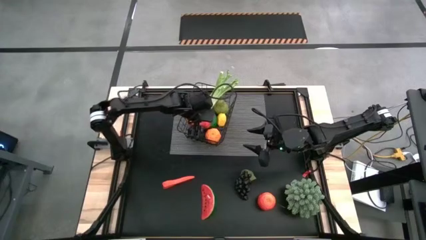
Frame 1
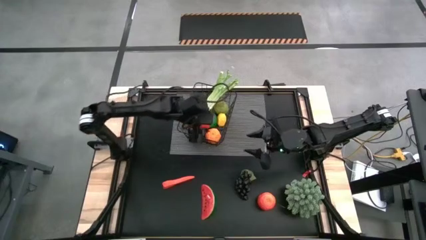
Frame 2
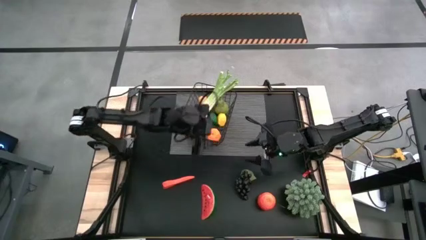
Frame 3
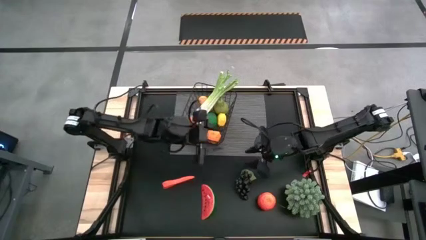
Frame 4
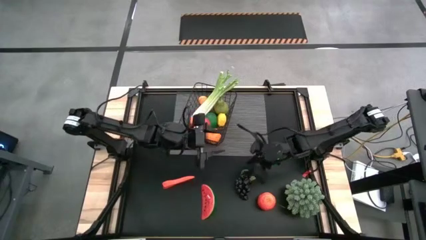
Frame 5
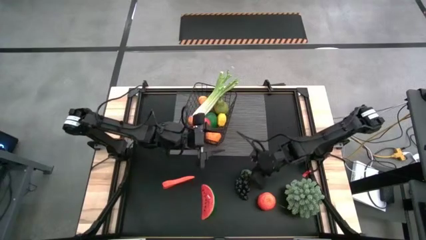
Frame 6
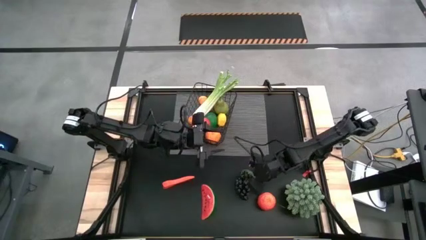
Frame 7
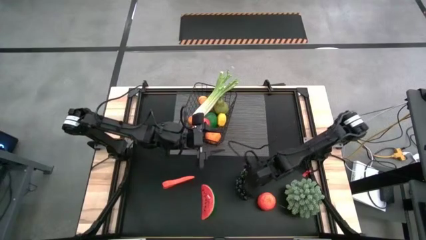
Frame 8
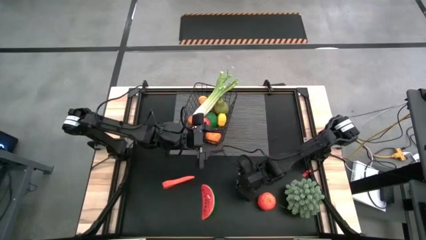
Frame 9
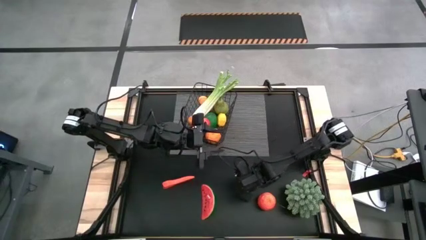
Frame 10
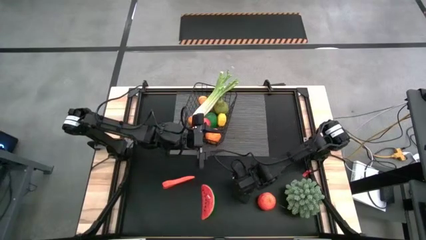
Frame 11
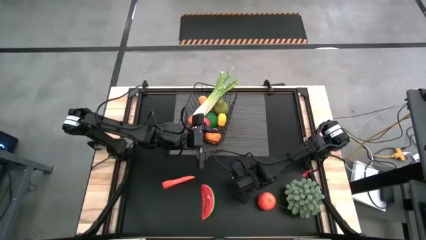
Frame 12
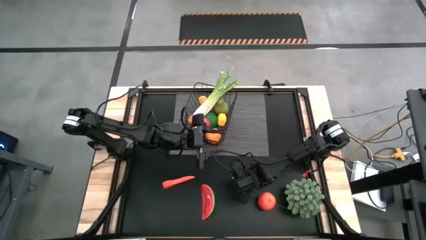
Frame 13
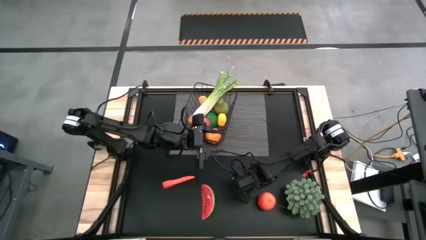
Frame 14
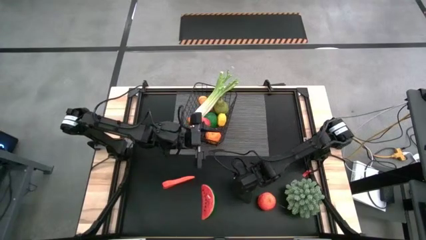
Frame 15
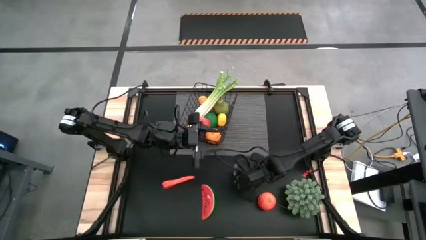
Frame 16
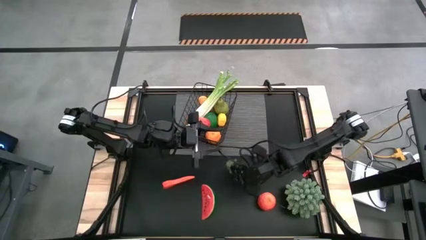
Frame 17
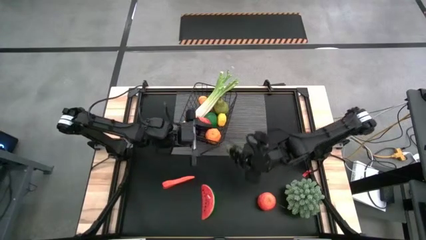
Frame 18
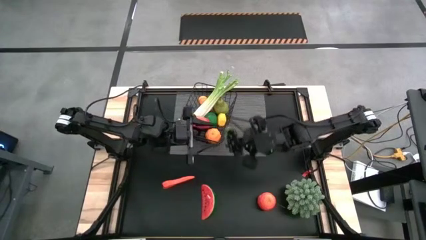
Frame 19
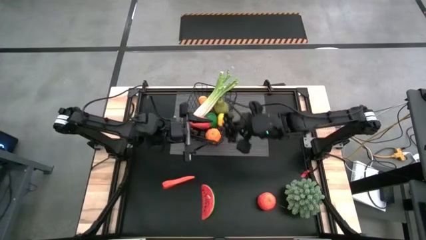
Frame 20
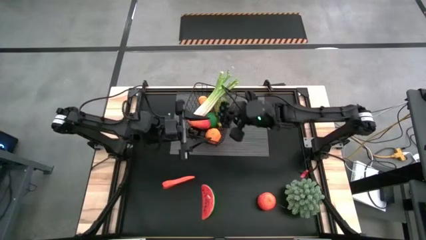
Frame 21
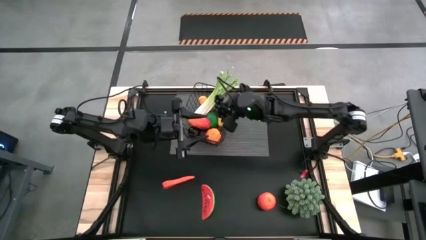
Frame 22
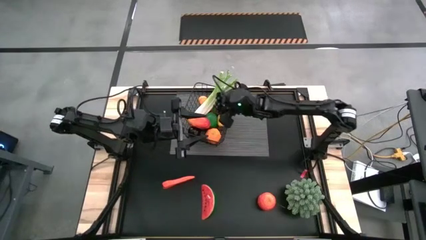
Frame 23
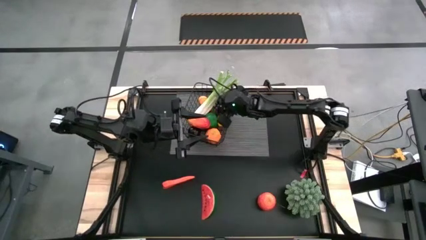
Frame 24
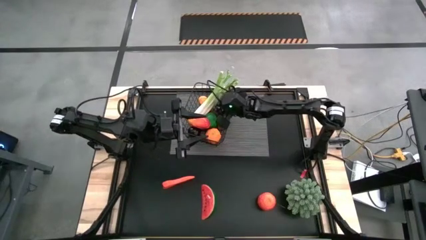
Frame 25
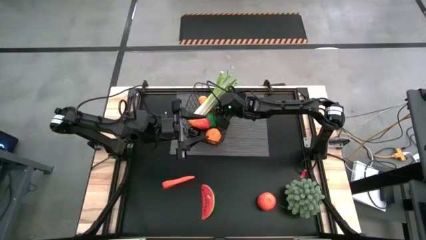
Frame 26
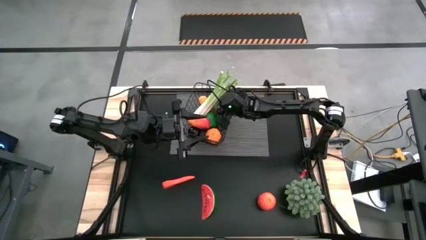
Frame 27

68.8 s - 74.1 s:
Task: Build produce basket
Put the grapes into the wire basket

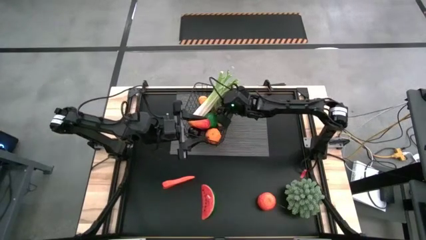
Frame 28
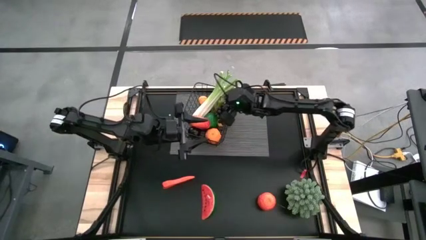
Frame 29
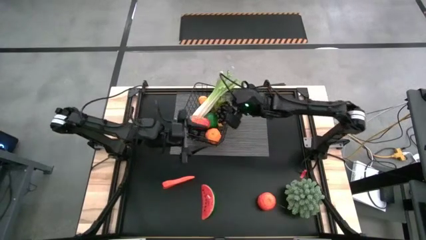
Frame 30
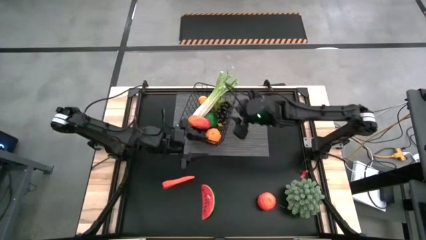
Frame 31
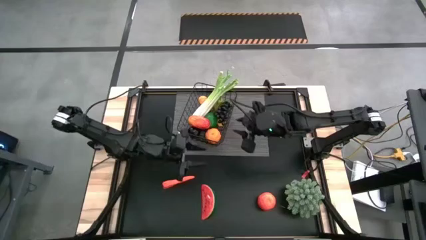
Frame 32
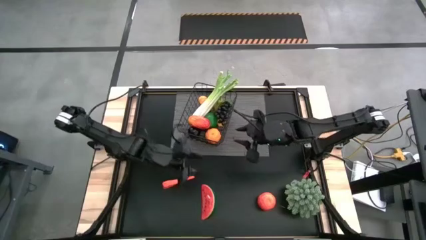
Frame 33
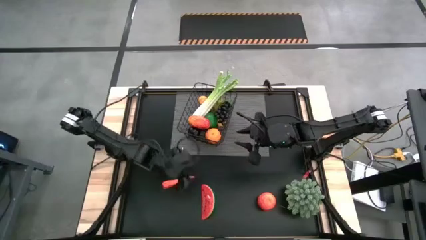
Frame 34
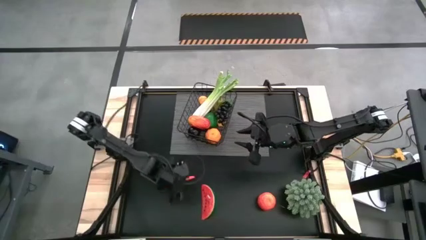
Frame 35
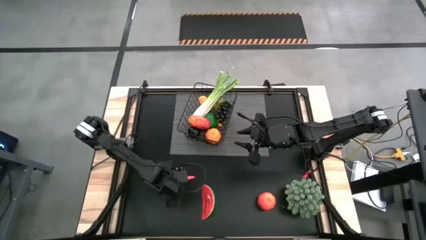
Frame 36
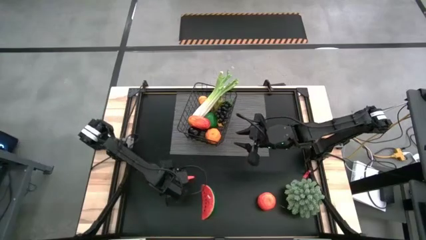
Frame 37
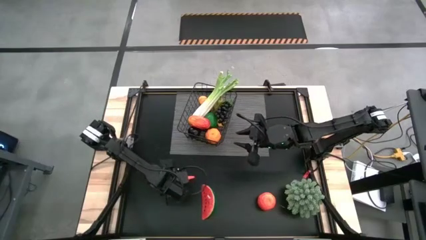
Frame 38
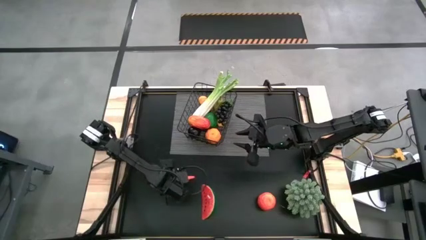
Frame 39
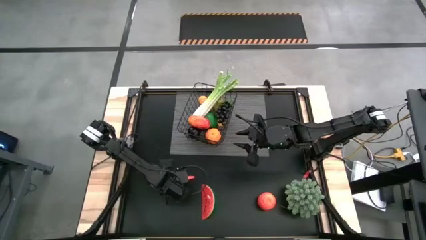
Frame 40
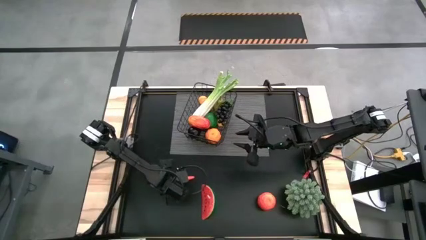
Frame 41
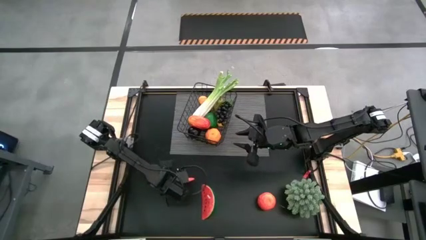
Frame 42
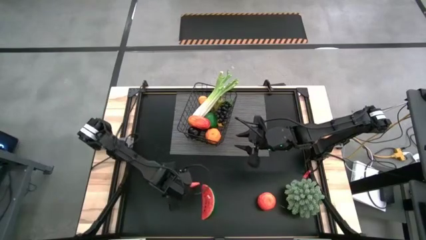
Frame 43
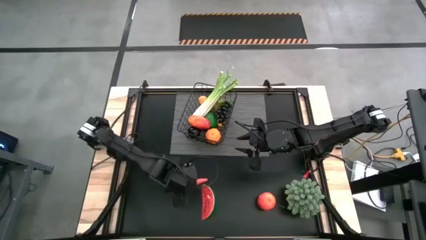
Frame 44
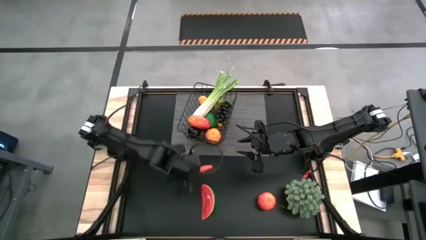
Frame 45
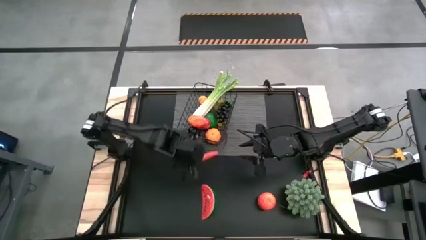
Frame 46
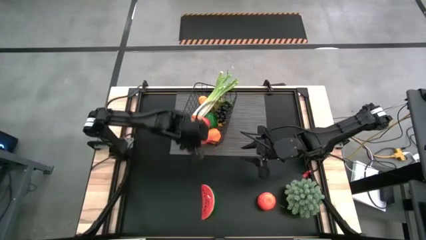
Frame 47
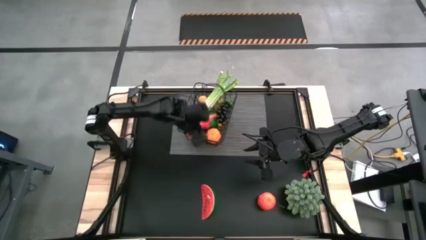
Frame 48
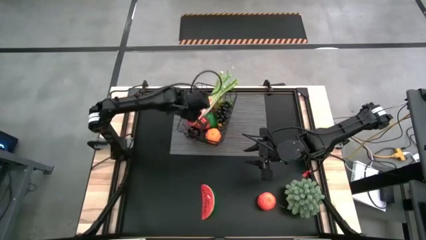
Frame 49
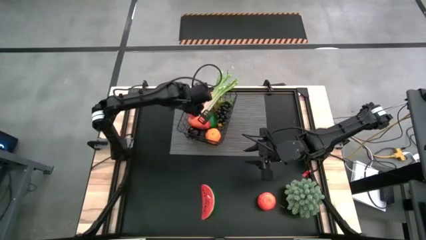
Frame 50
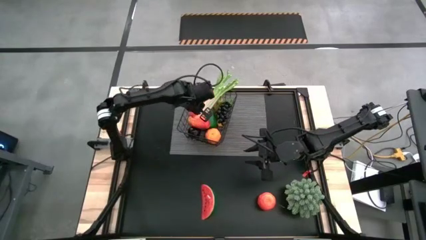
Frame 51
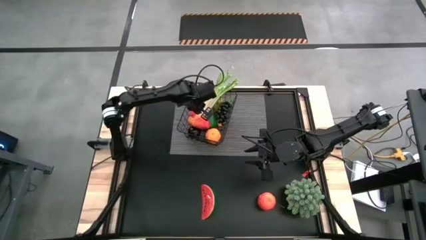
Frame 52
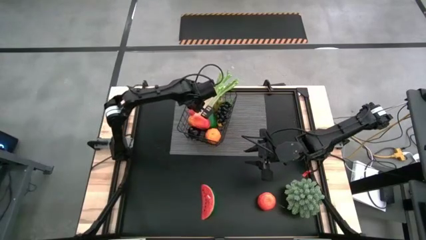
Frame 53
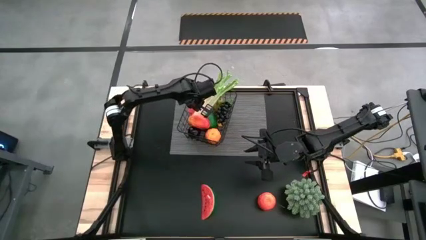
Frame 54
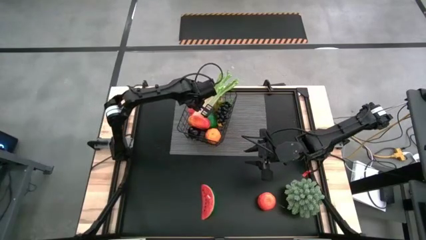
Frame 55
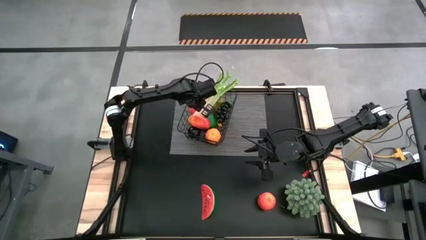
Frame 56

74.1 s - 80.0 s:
Put the carrot into the wire basket

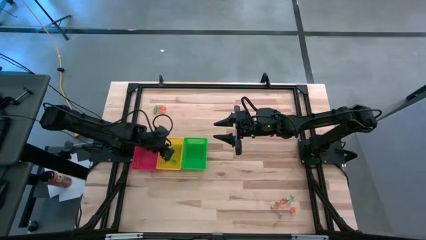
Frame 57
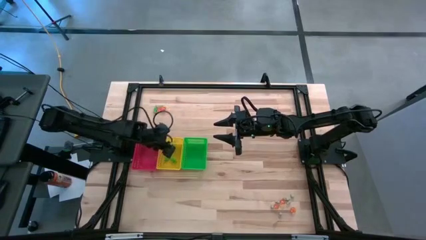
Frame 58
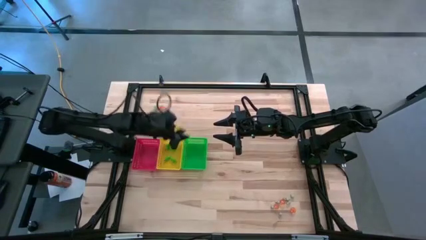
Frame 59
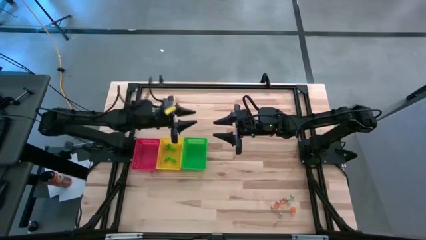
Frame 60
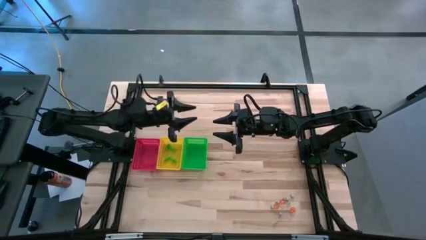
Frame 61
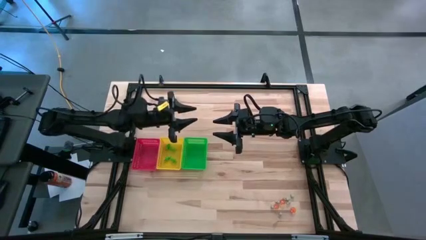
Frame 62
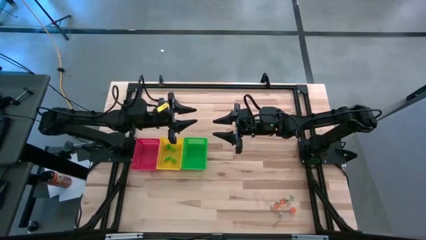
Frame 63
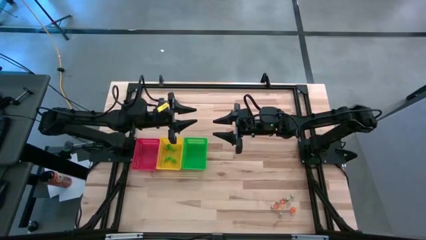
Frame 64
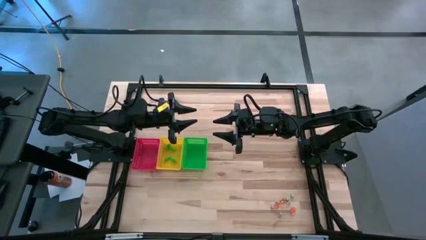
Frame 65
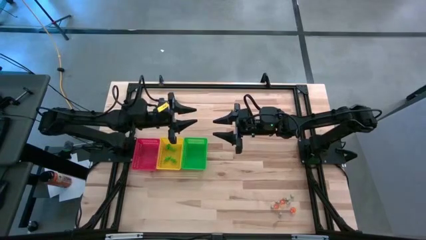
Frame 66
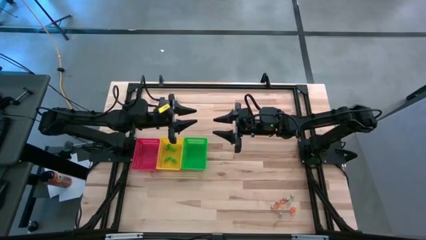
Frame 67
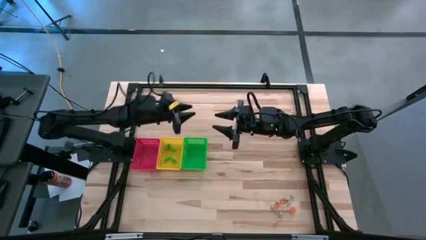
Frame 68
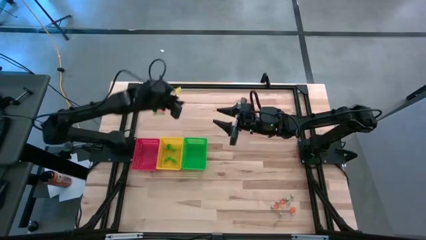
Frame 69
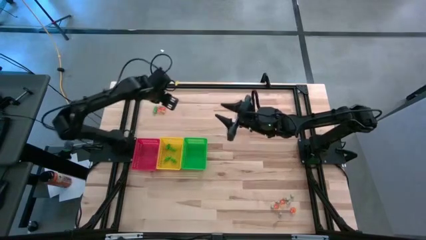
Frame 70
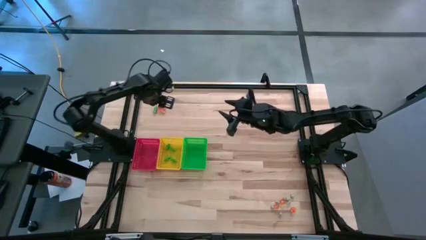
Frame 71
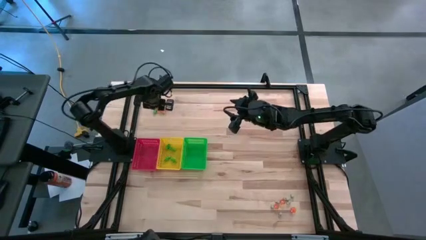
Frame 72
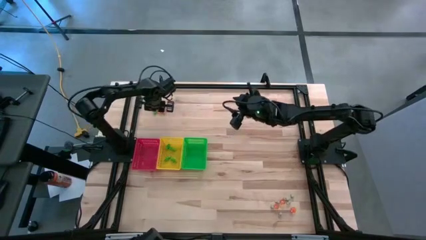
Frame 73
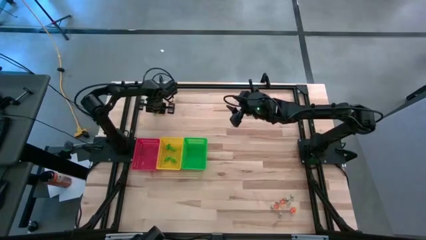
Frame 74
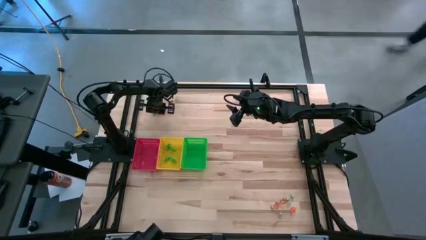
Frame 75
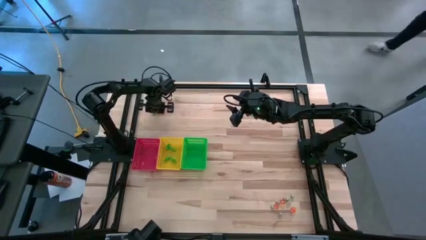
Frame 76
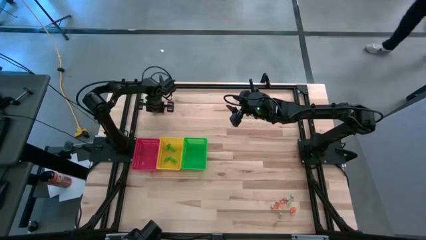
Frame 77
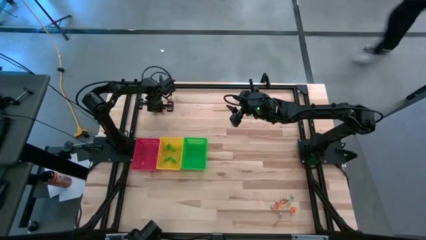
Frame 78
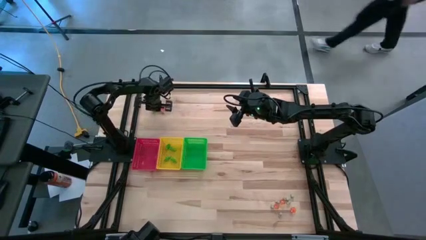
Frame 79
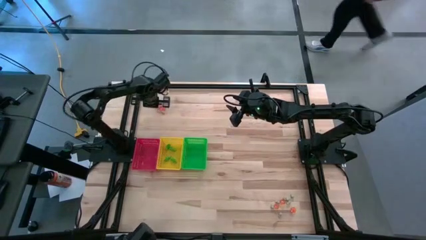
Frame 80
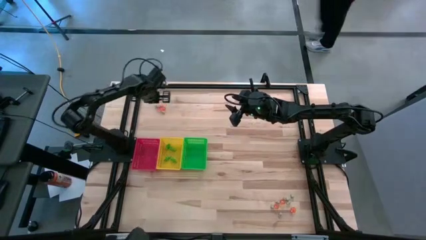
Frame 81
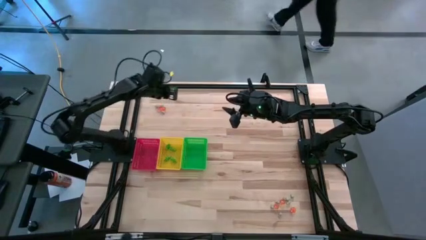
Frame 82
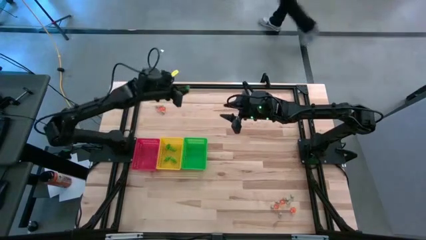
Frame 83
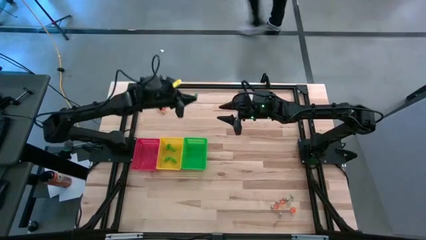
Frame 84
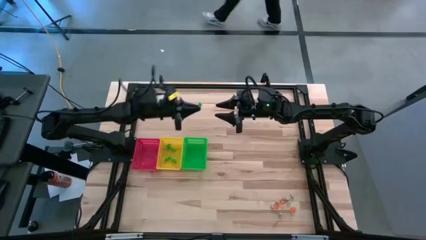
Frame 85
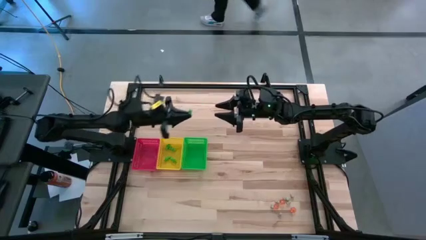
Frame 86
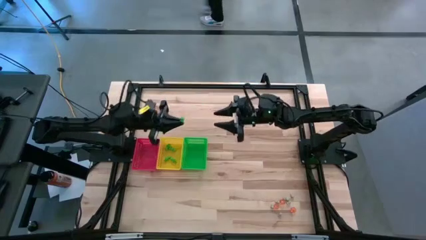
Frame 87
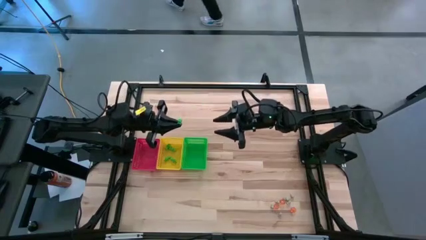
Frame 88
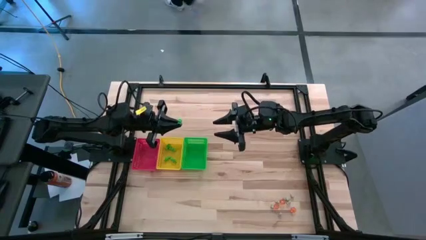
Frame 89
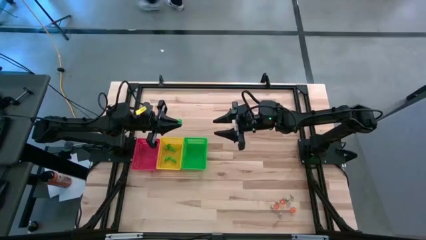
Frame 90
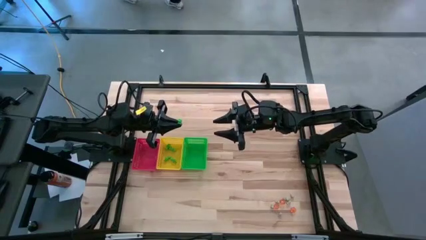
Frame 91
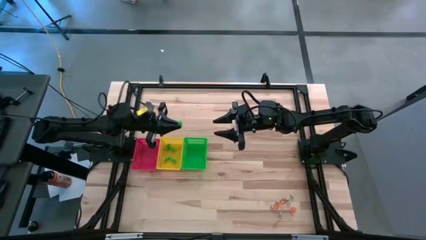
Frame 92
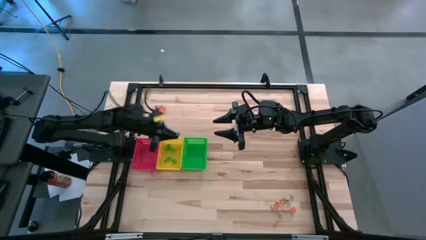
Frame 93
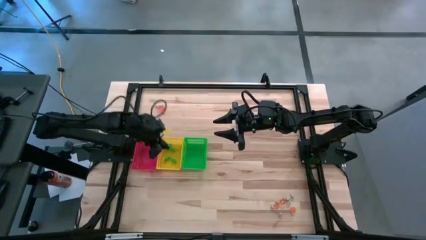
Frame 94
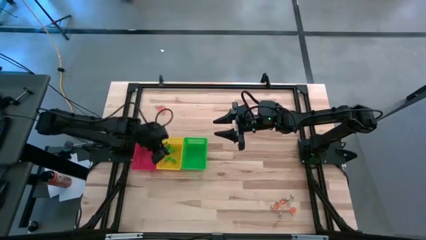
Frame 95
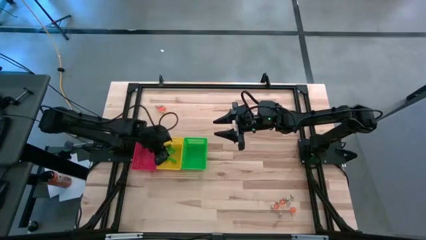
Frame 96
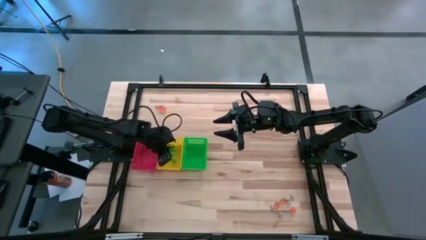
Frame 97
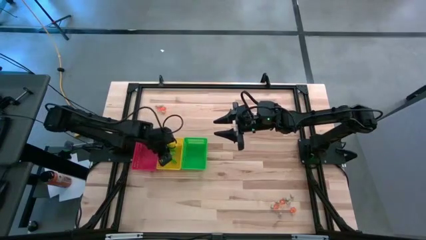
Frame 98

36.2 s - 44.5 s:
Task: Sort Halloween decoration
Put the green skeleton toy into the yellow bin
